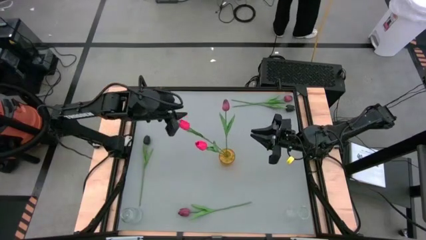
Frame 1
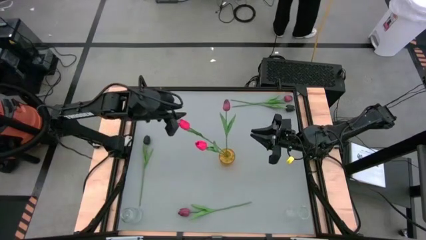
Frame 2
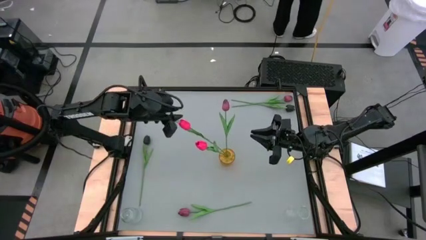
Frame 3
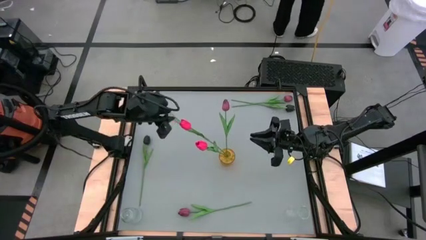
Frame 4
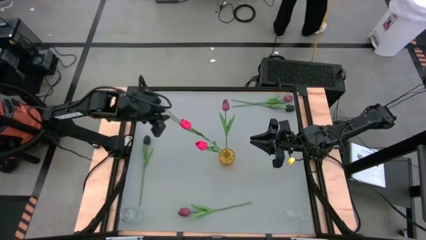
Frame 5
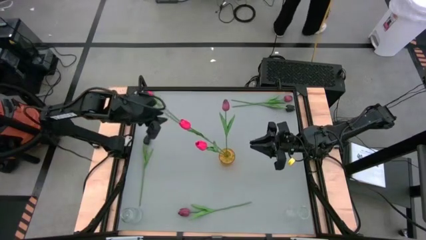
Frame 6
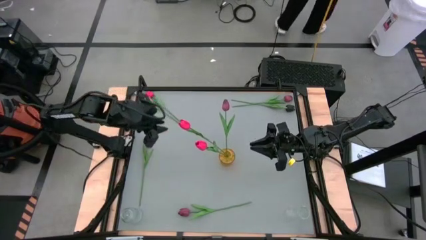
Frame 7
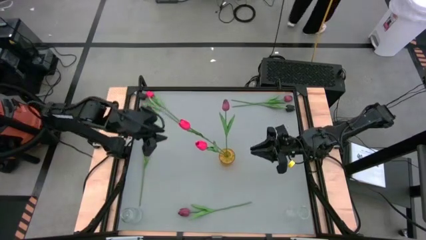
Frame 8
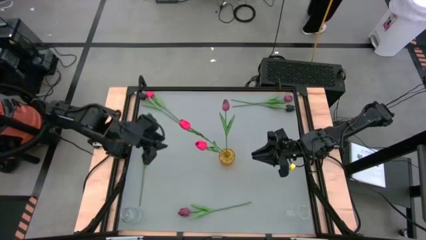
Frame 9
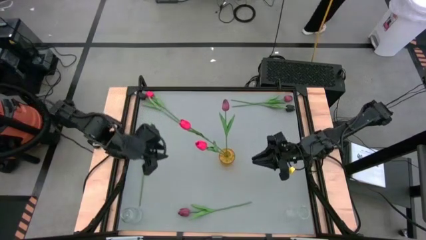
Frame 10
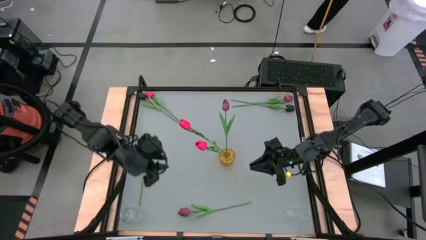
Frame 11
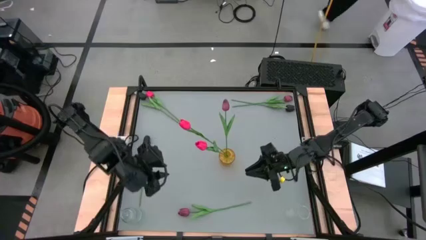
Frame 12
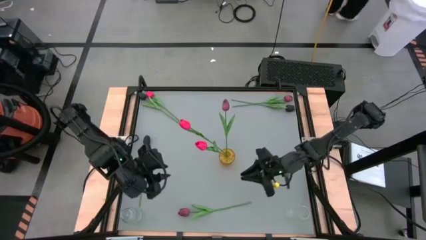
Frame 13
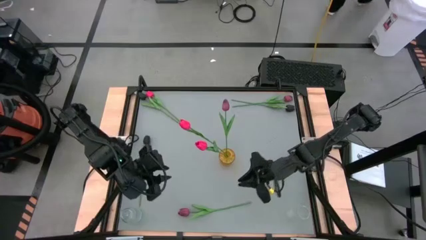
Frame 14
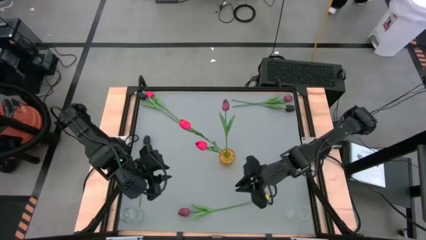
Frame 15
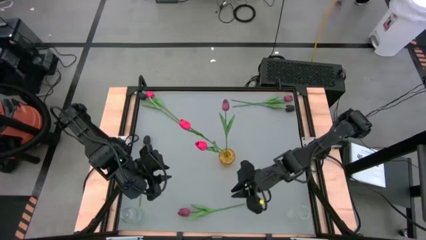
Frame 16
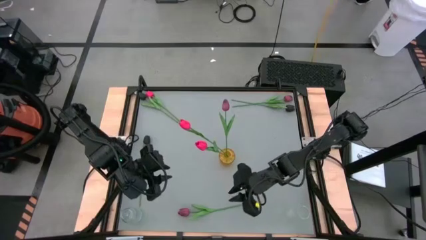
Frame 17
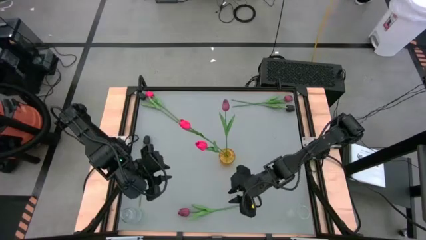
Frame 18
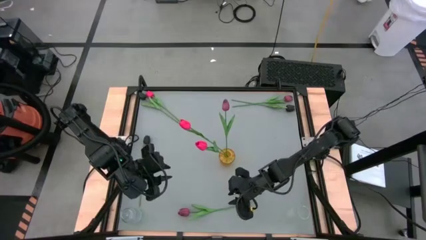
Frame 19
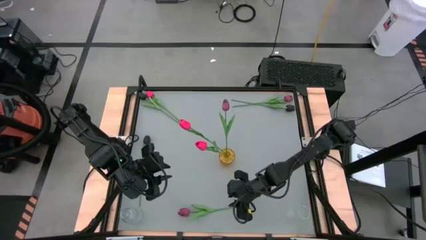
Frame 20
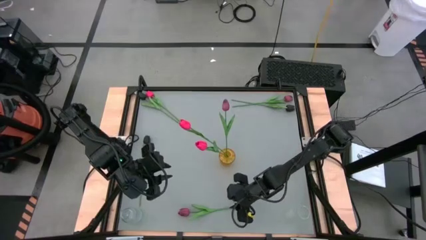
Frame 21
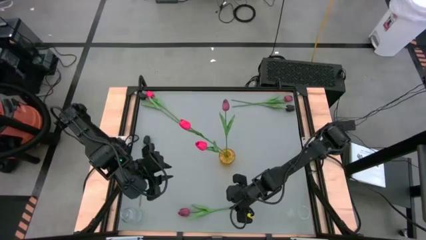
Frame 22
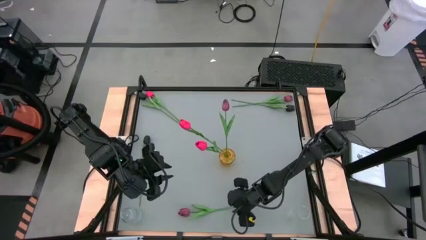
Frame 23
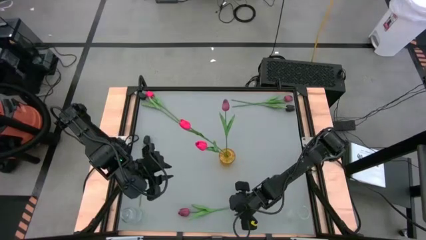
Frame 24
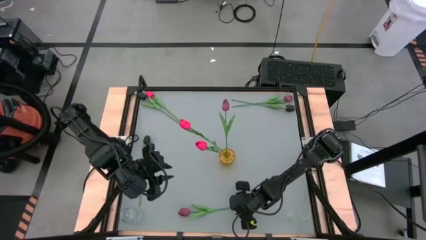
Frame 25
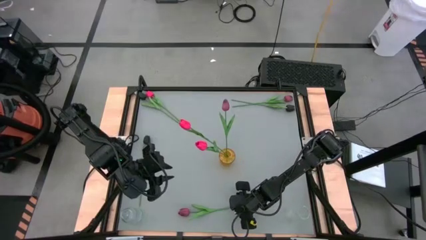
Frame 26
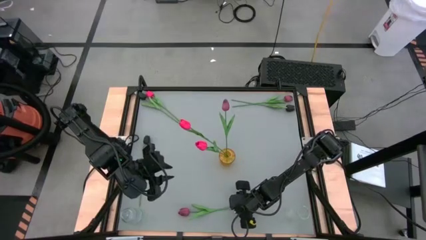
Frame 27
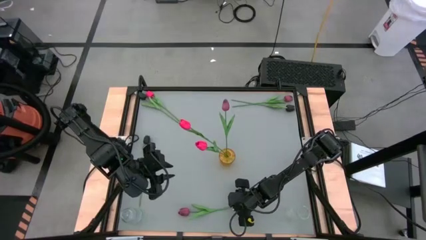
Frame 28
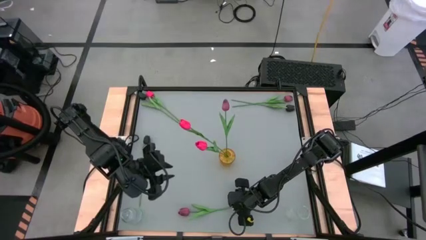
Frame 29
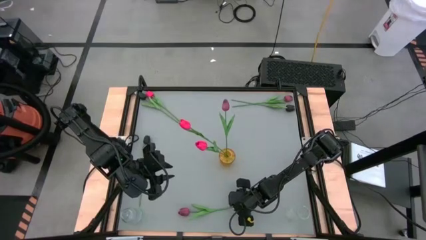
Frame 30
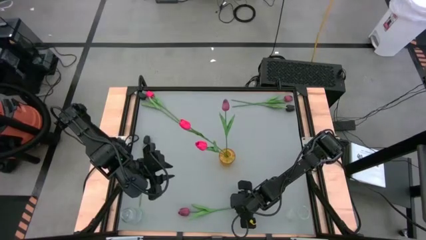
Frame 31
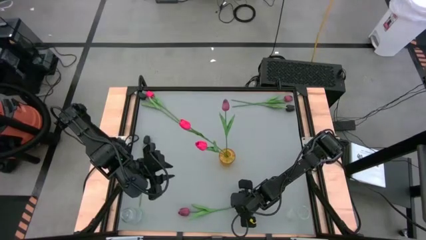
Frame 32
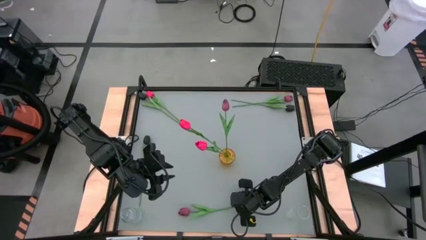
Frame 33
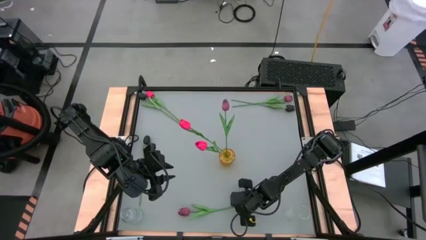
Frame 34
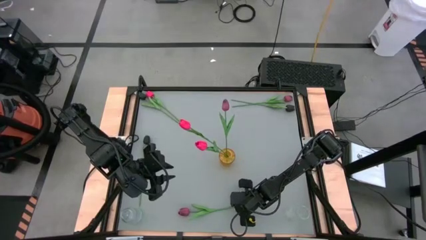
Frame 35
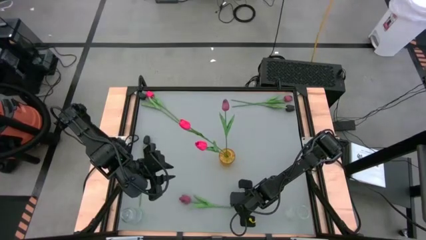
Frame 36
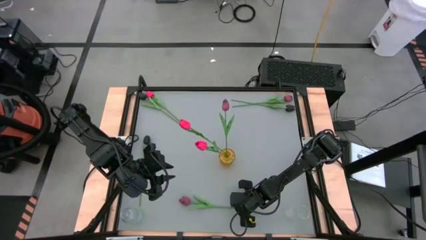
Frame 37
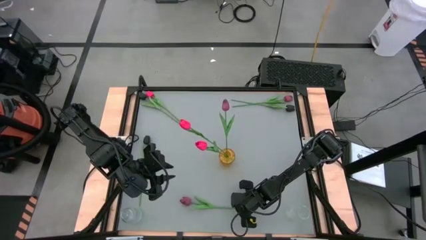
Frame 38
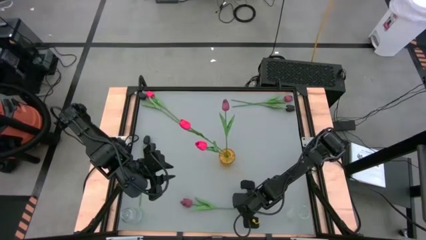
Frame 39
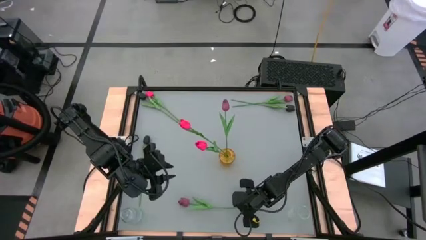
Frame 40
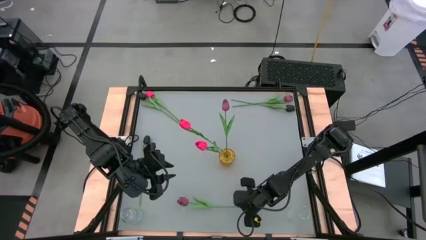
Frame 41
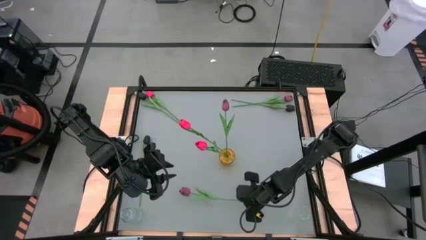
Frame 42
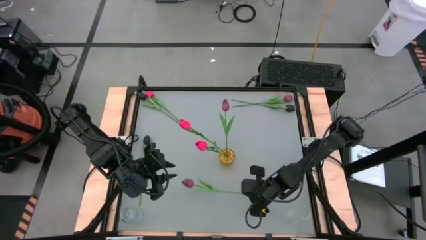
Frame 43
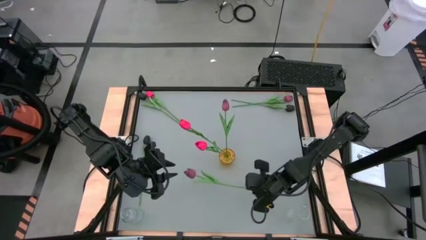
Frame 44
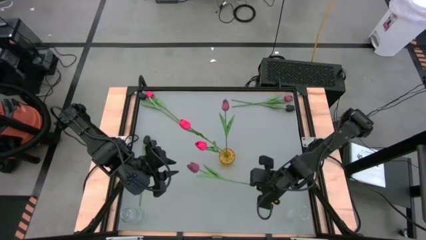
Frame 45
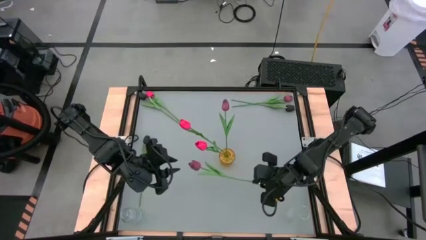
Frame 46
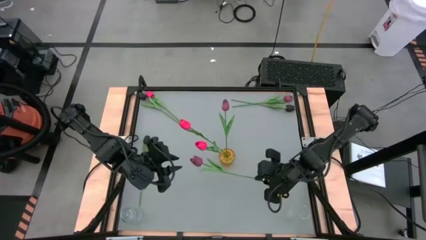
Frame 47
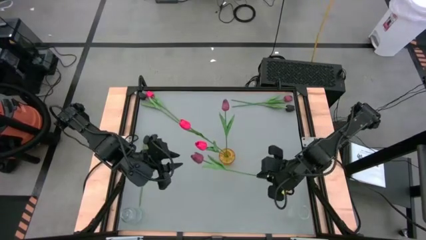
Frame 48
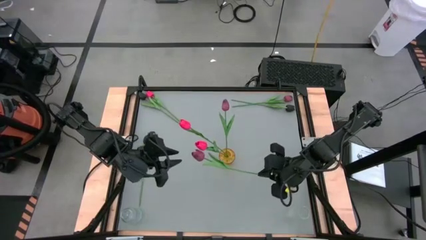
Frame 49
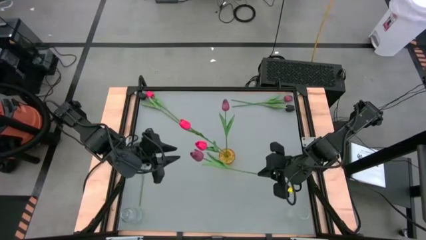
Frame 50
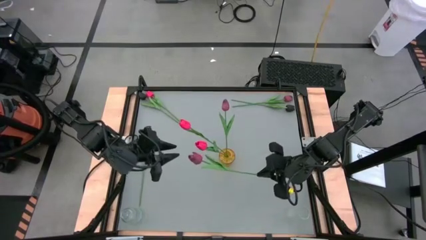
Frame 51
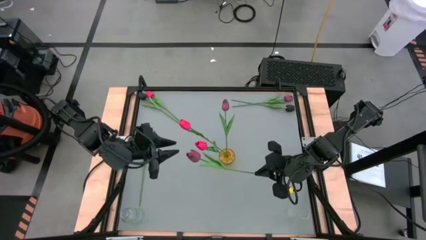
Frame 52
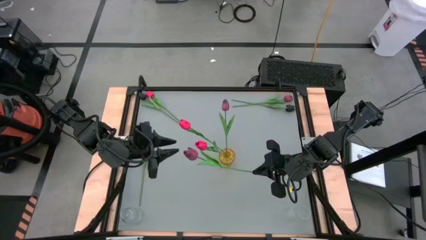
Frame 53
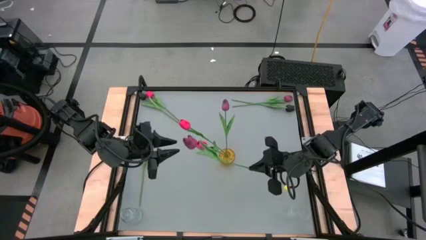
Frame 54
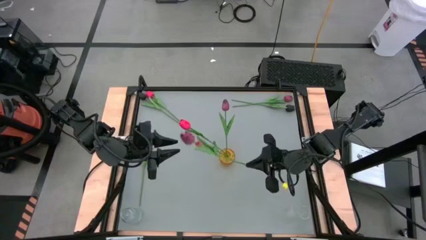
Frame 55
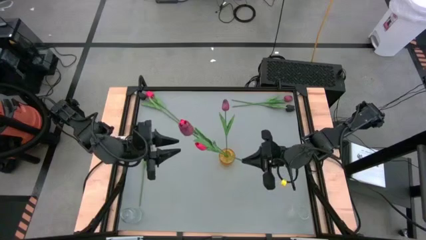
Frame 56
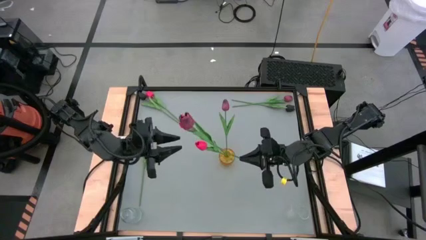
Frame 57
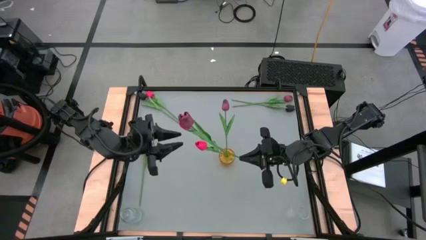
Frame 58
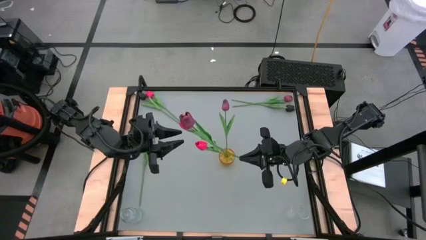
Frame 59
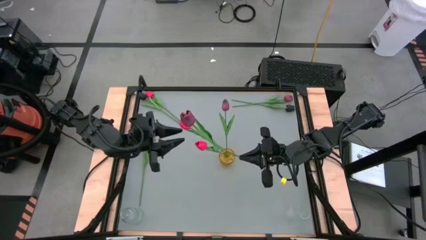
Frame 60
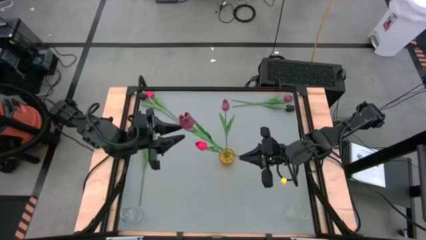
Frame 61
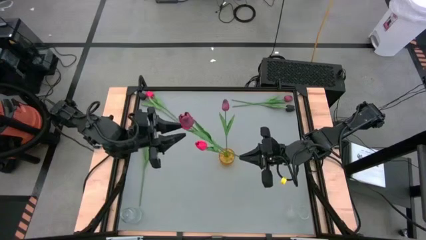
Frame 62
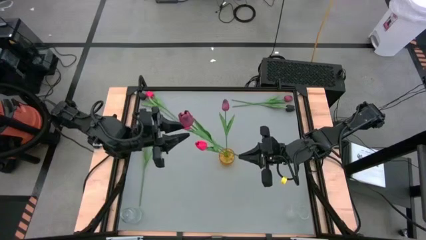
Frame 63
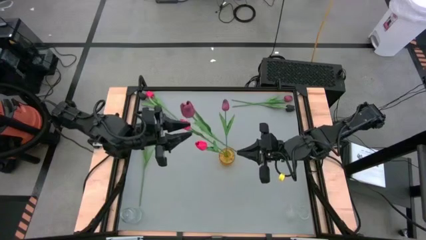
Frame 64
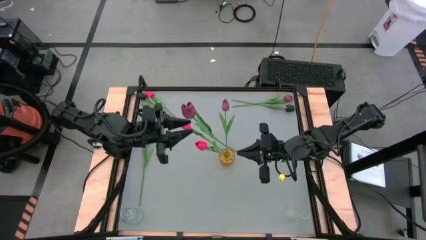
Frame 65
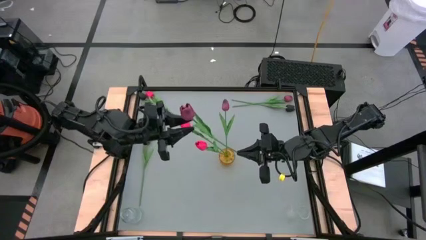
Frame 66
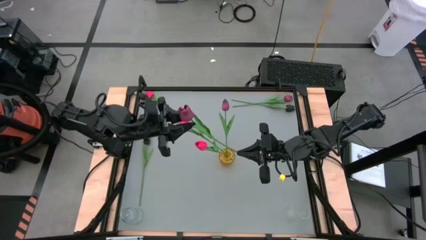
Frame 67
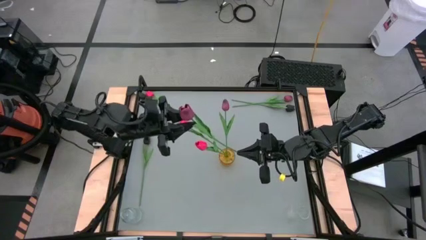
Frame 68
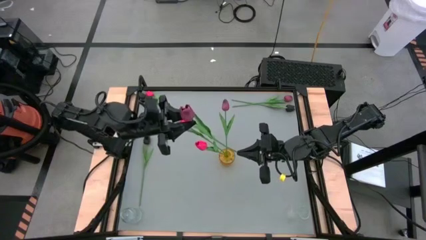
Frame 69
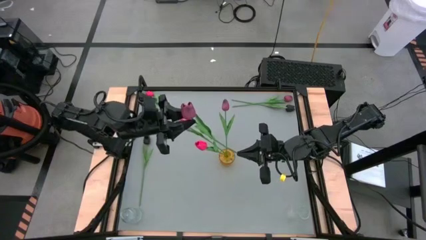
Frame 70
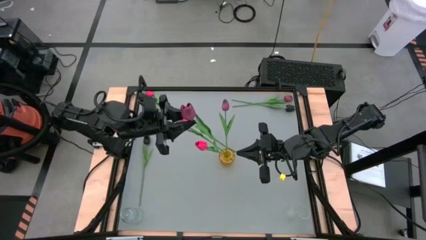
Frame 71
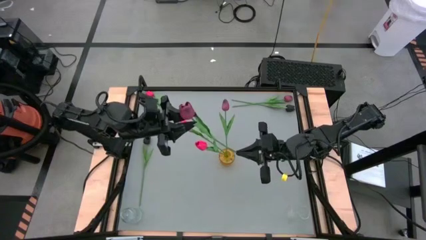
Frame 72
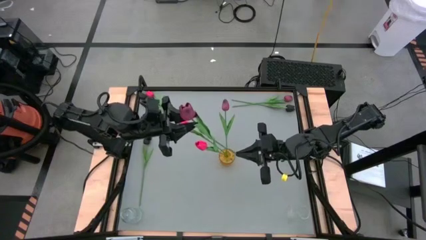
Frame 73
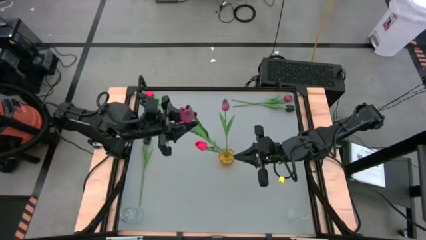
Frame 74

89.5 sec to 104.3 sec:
Task: Sort flowers into vase by color
Put the bottom red flower into the yellow vase
